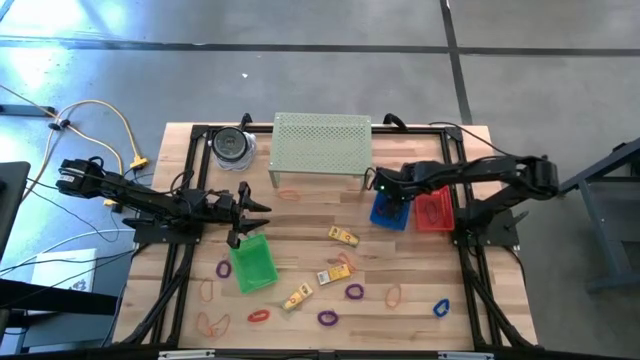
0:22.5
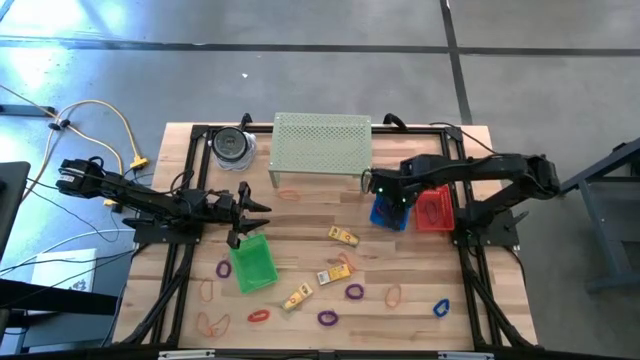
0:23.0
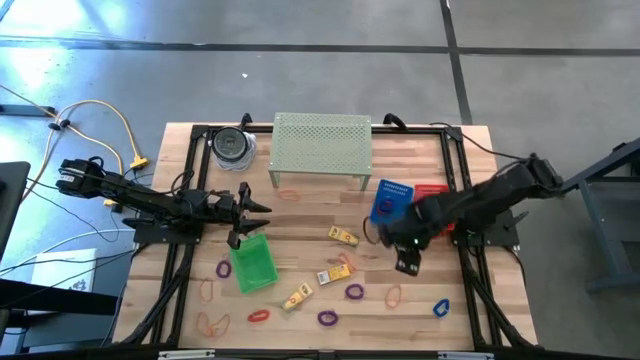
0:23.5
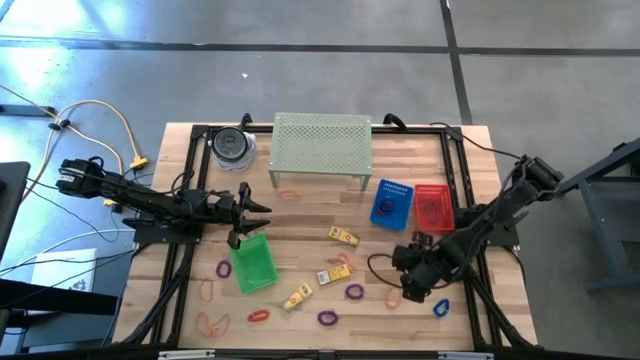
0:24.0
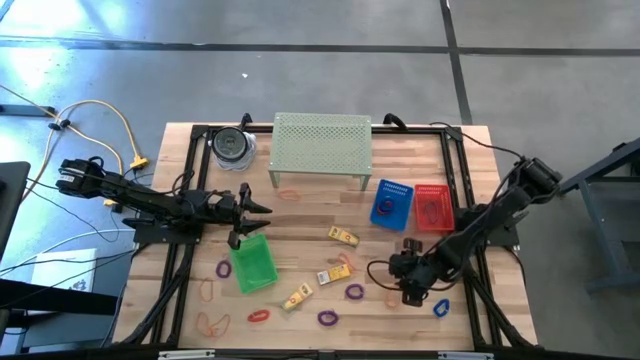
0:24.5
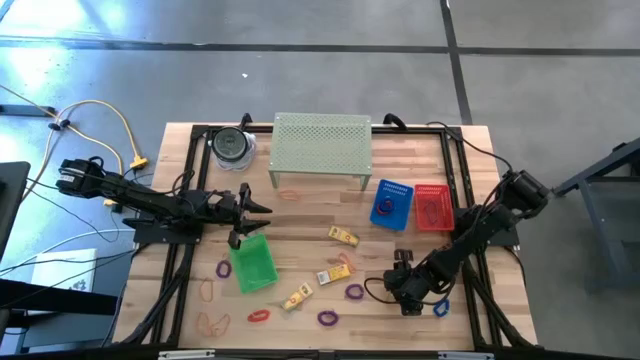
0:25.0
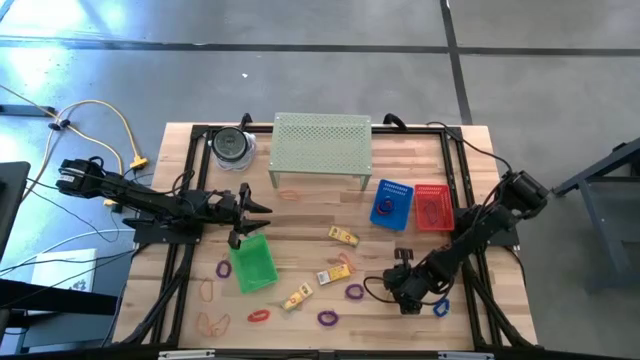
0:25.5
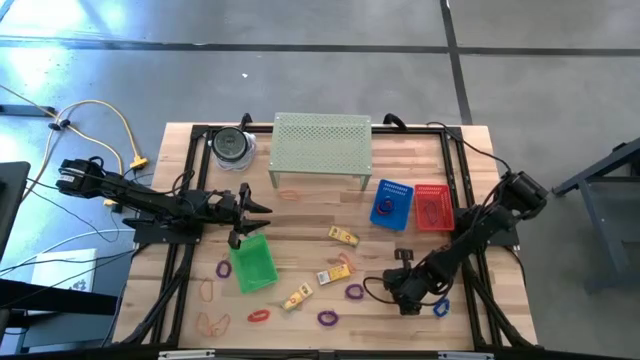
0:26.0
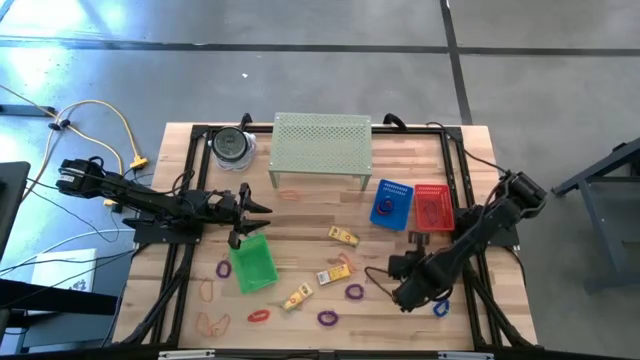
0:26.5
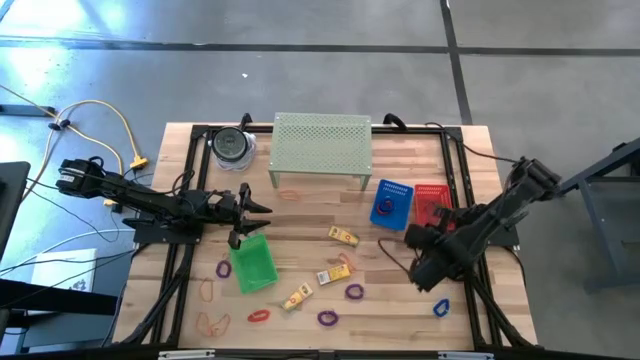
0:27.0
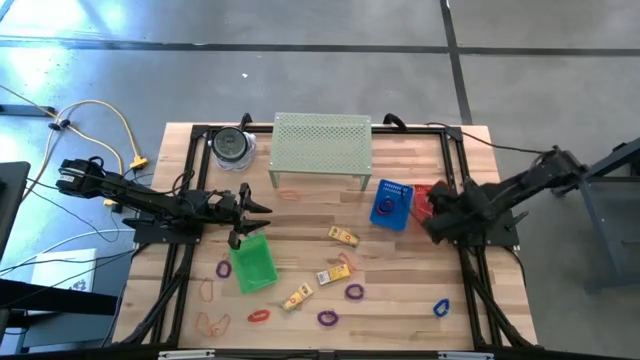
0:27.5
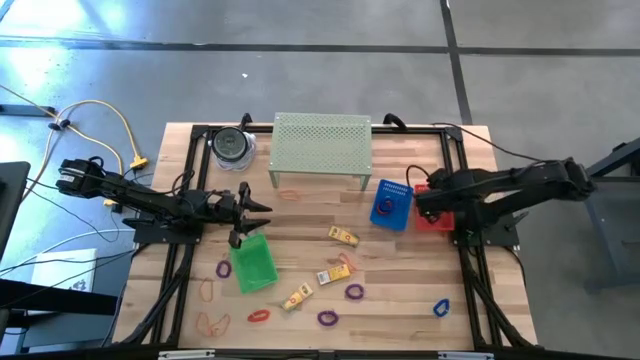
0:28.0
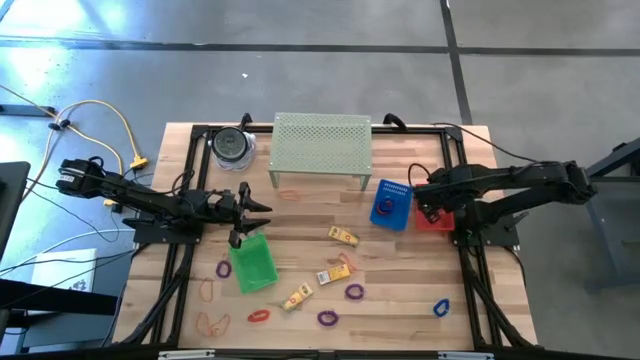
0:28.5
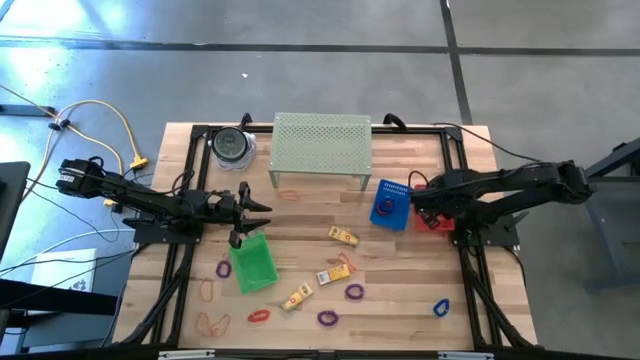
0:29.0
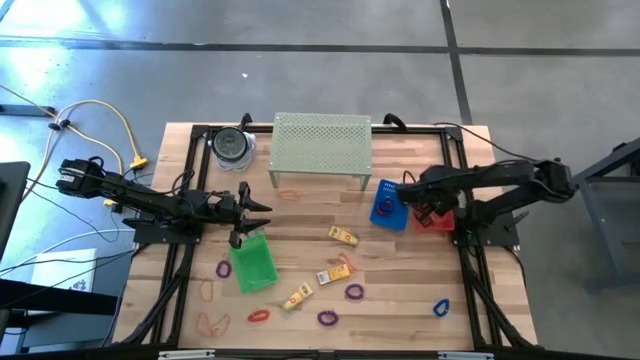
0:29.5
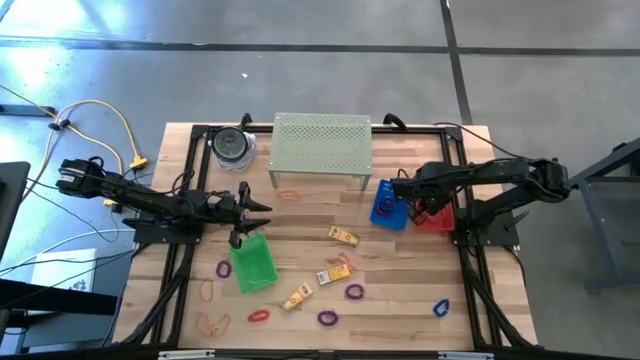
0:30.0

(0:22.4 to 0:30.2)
Task: Pick & Place Office Desk Supplies
Put the orange rubber band into the red bin

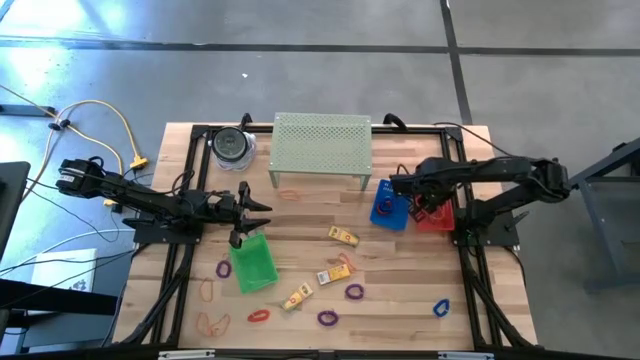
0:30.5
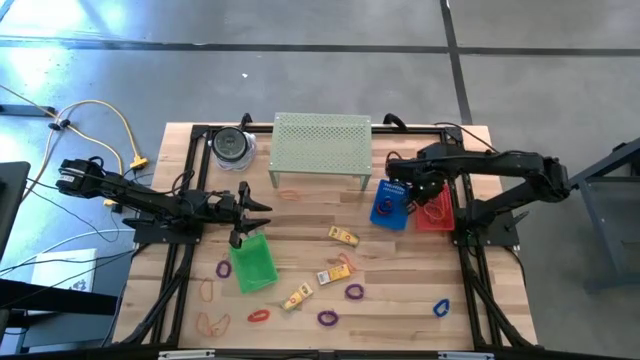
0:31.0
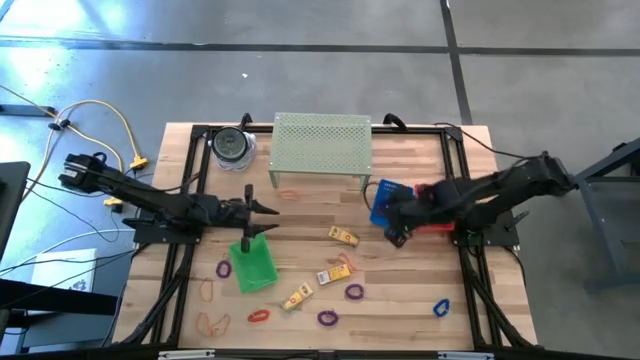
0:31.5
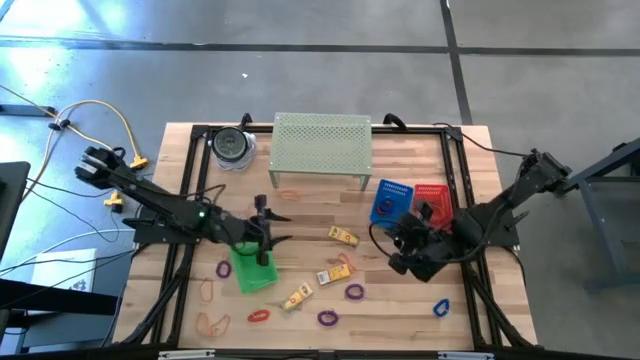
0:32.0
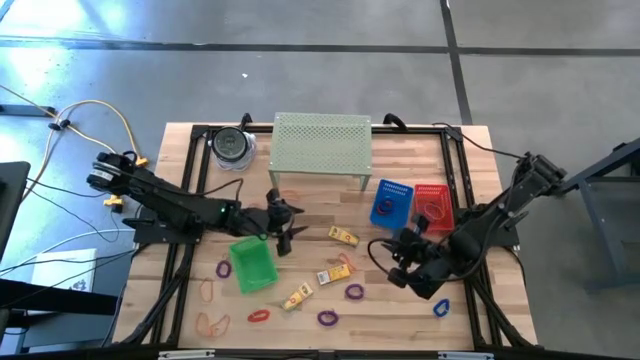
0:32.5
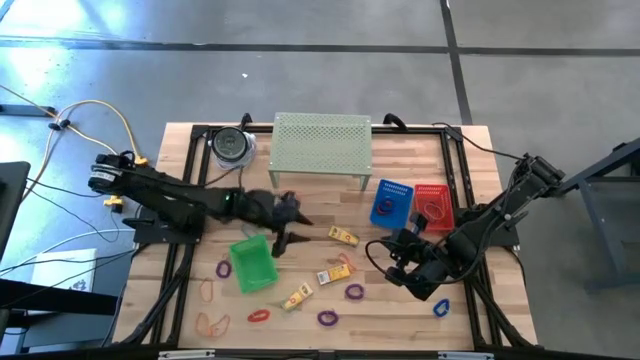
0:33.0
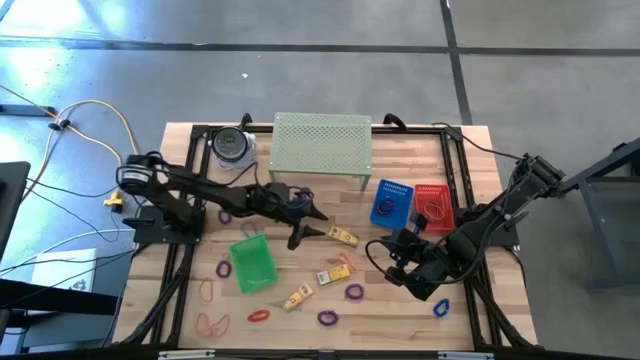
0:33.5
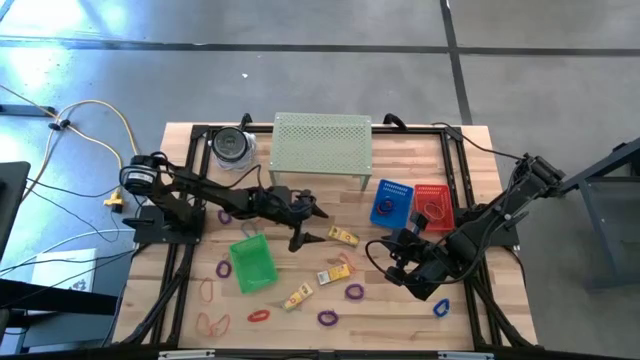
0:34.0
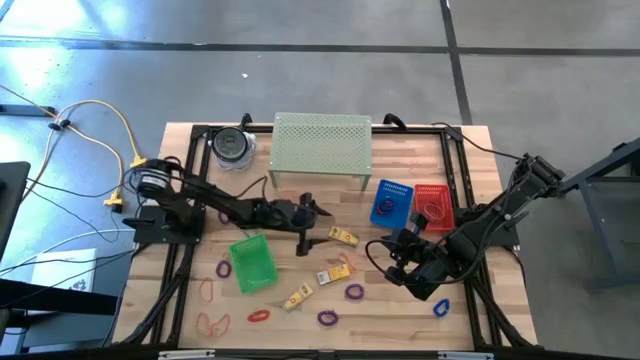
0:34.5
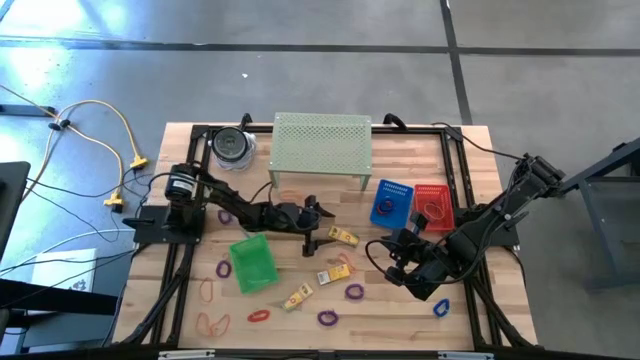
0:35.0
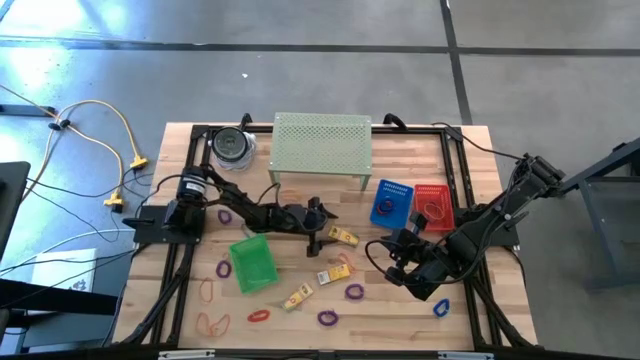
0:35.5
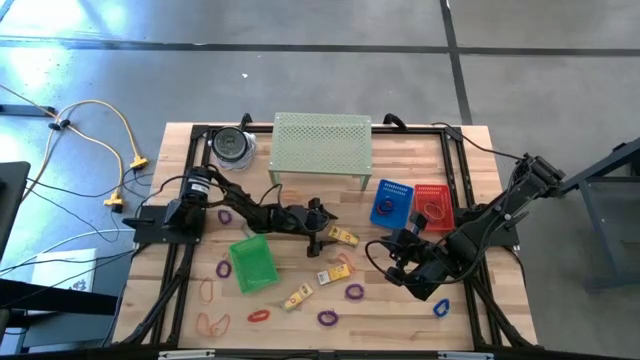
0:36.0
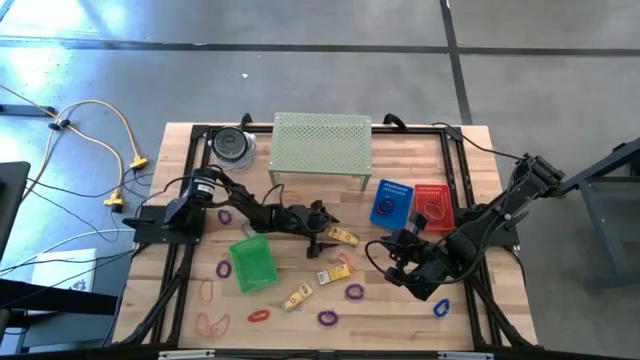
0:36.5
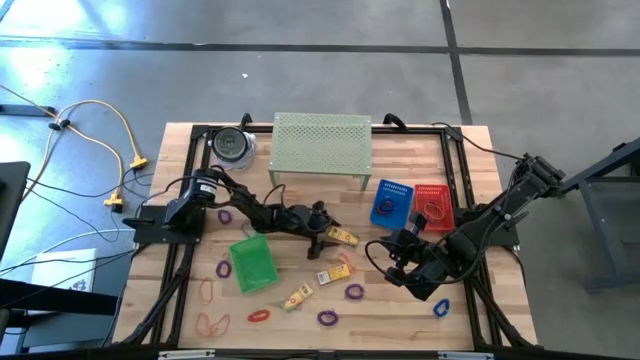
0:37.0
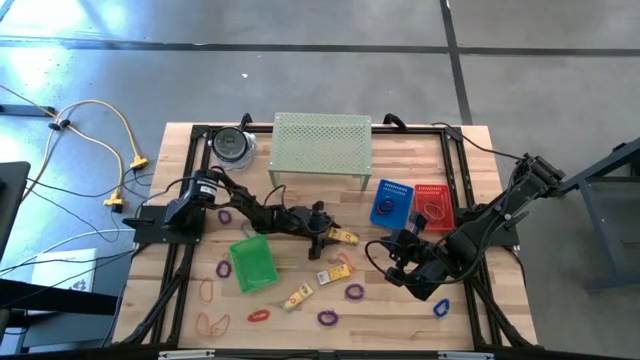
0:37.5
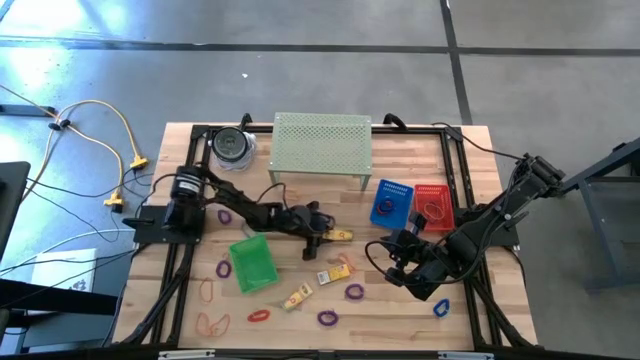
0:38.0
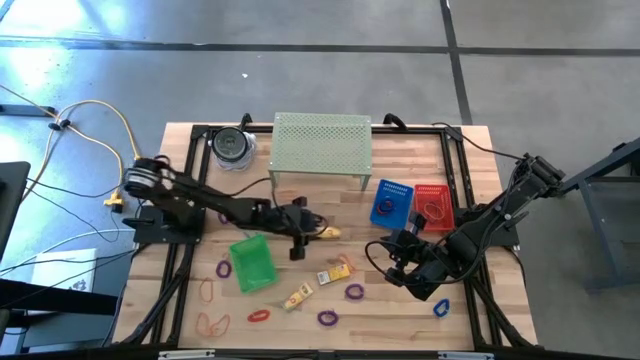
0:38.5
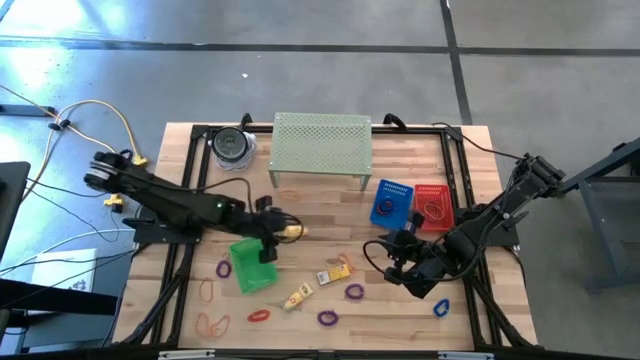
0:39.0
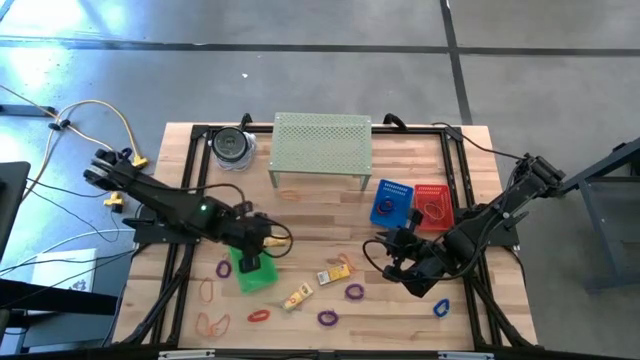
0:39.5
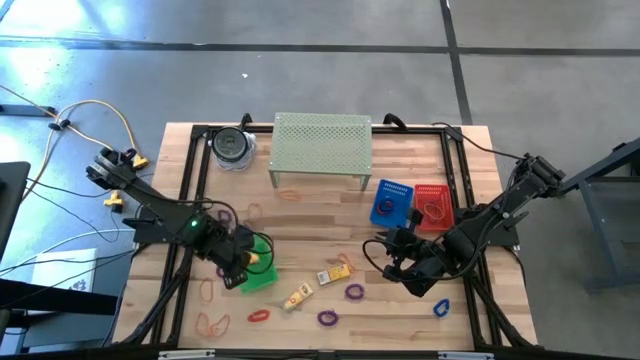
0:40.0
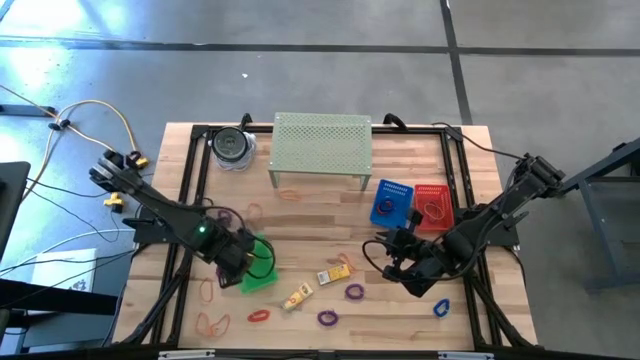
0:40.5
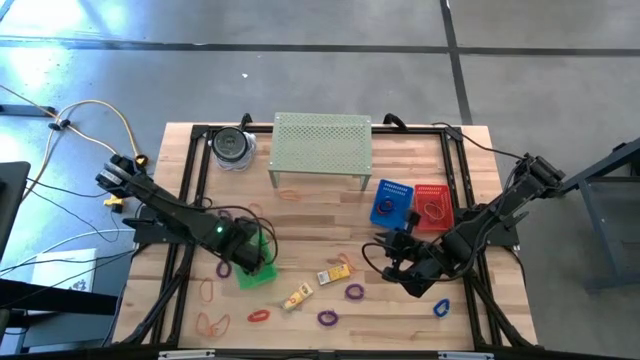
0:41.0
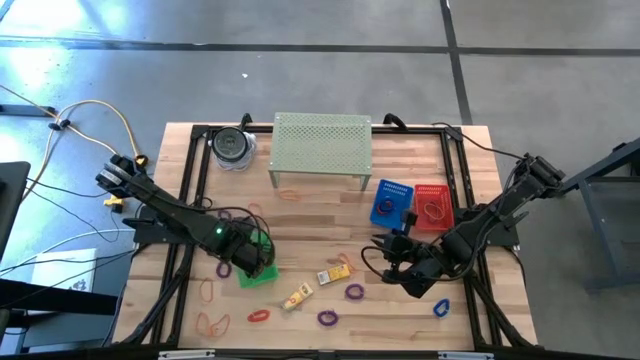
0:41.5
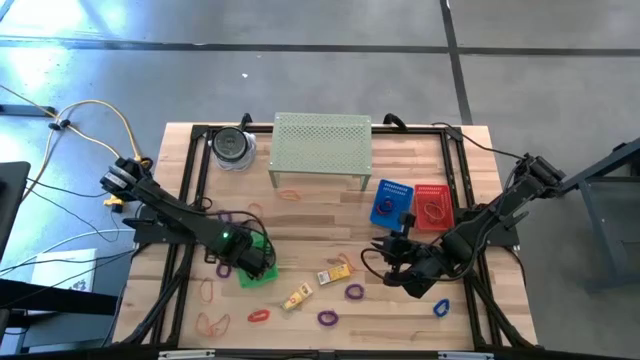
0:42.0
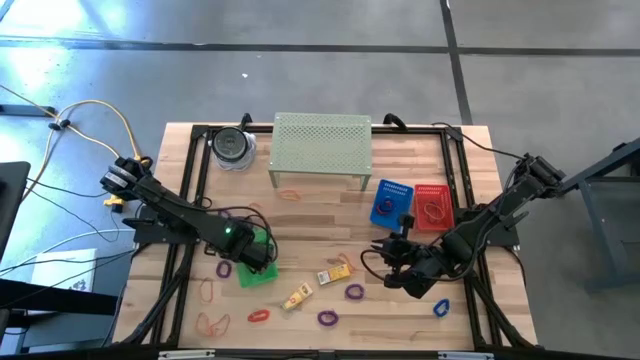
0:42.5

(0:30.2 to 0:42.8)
Put the crayon box into the green bin

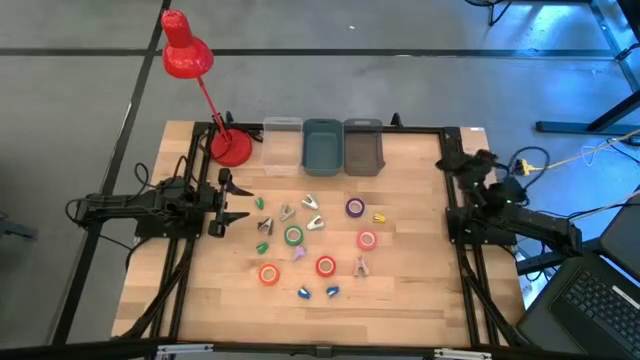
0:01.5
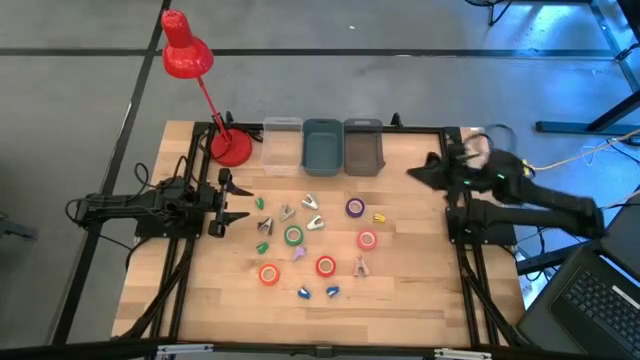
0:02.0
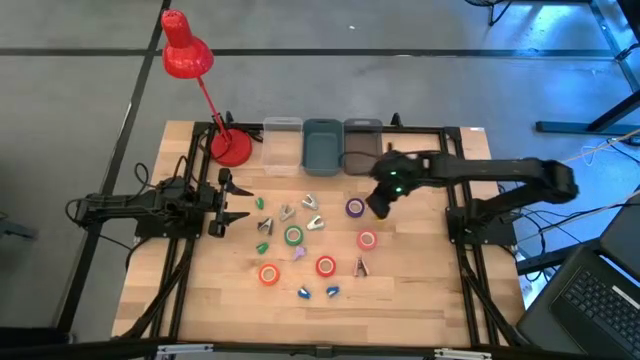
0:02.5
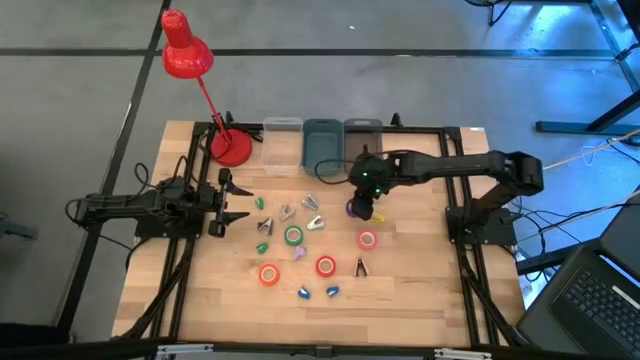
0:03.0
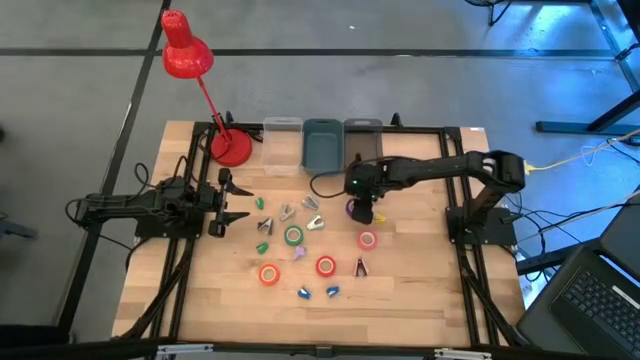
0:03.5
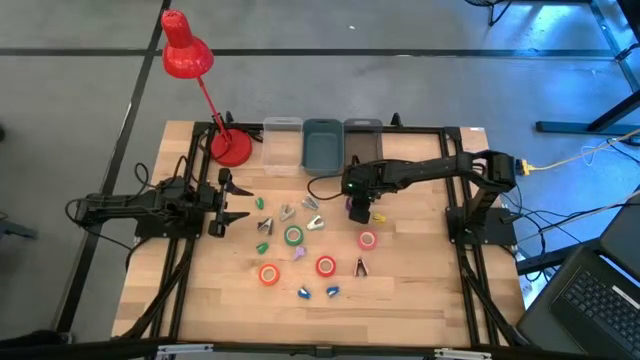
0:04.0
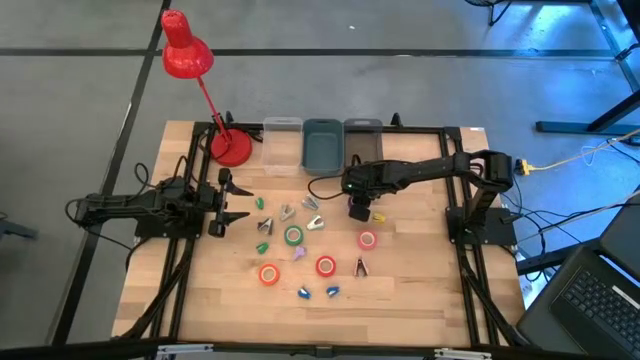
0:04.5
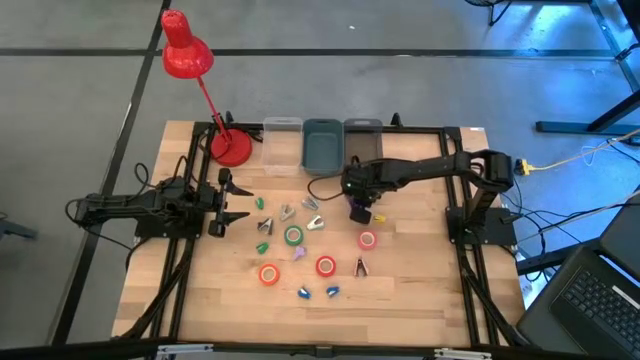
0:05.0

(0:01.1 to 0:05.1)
Task: Pick and place Stapler, Stapler remover, tape
Put the purple tape into the black bin
